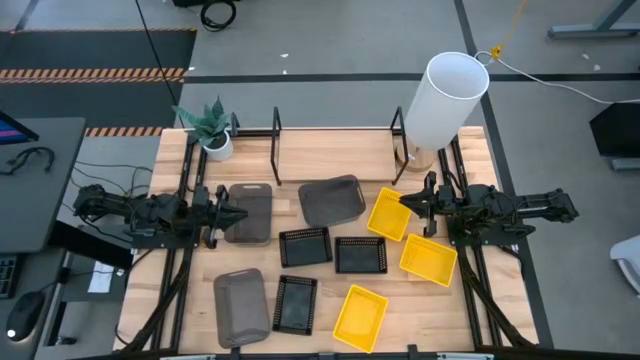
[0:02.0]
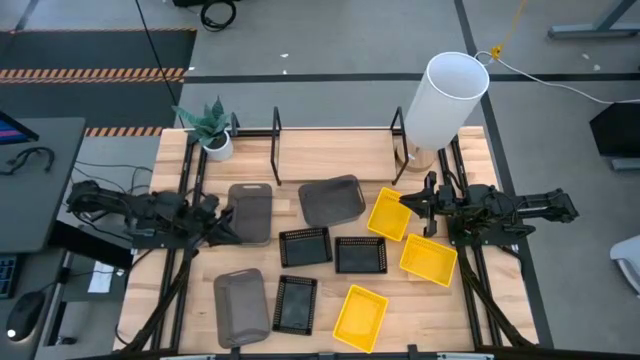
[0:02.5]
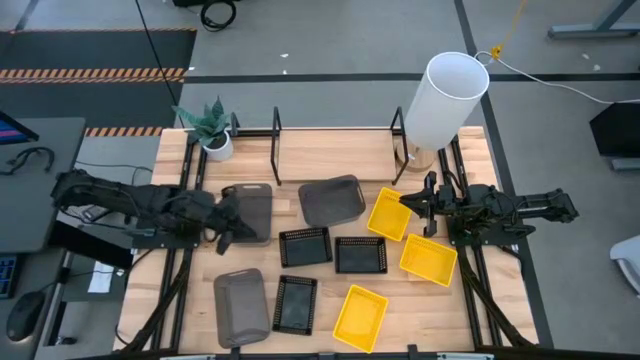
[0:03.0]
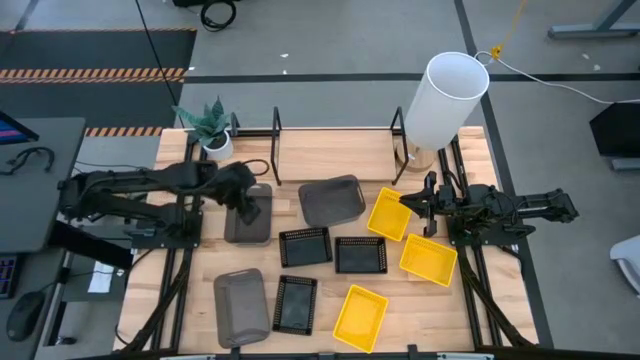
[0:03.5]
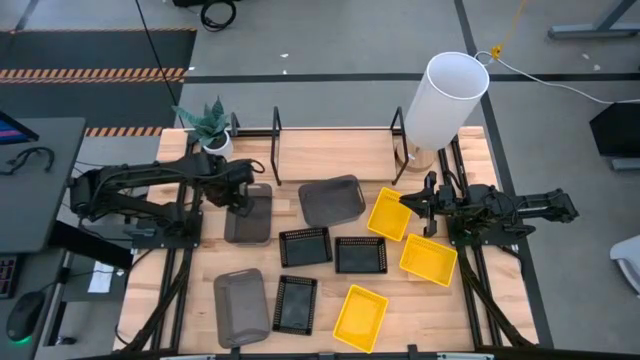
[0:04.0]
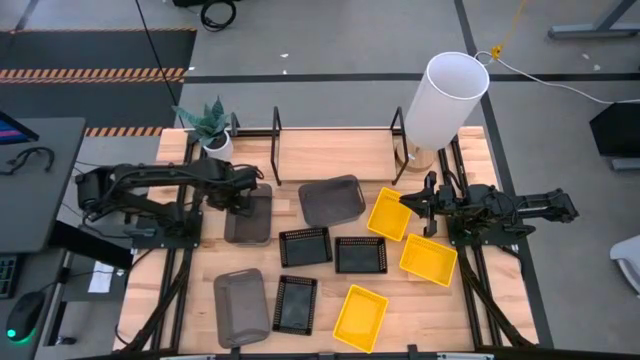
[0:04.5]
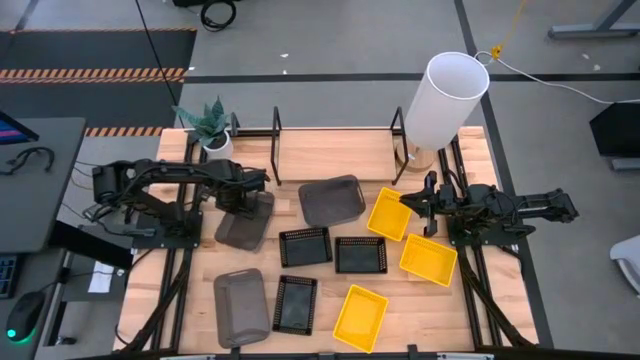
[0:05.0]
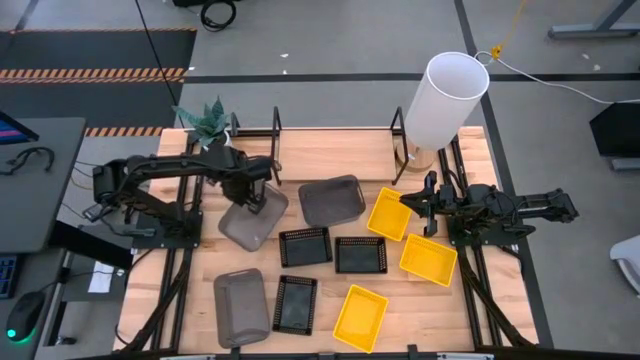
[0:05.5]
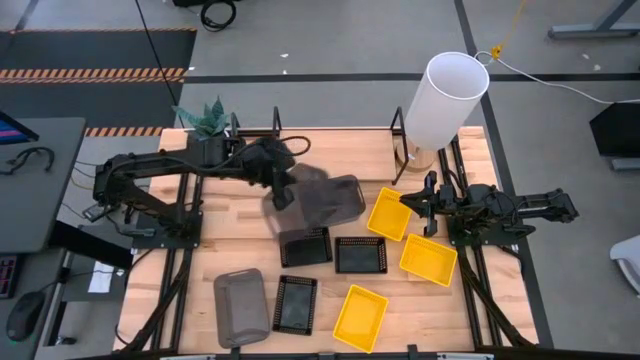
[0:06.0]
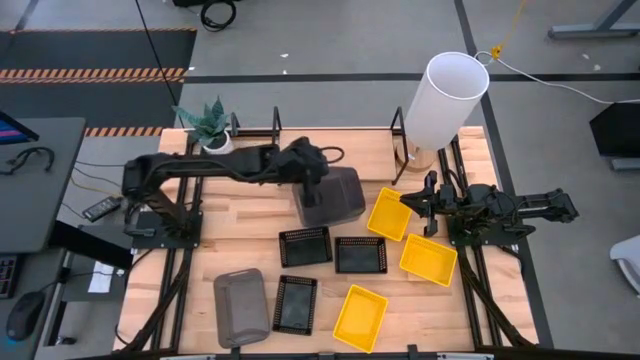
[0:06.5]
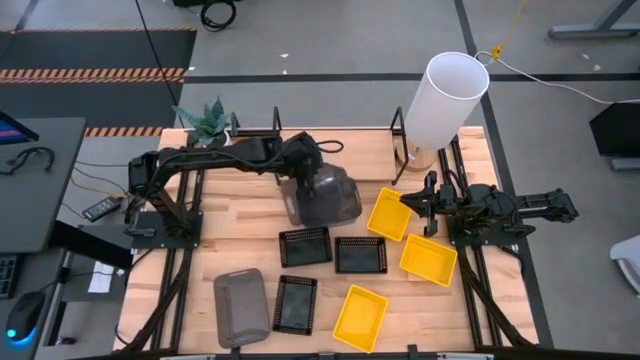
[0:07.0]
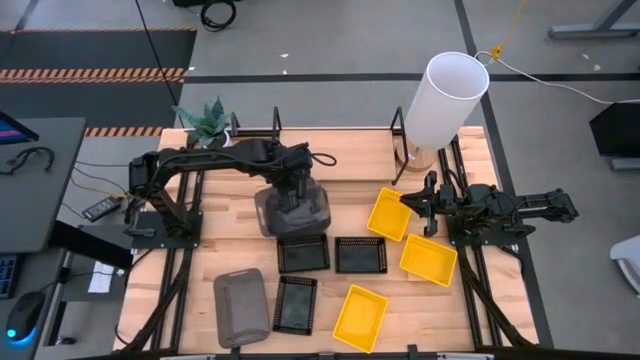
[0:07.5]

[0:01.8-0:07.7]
Task: Stack baskets on shelf by color
Stack the top left black bin on the top right black bin

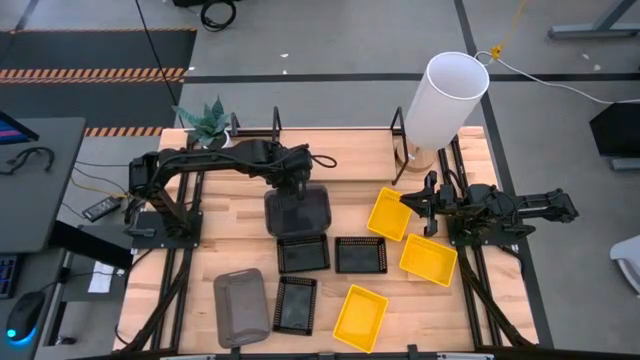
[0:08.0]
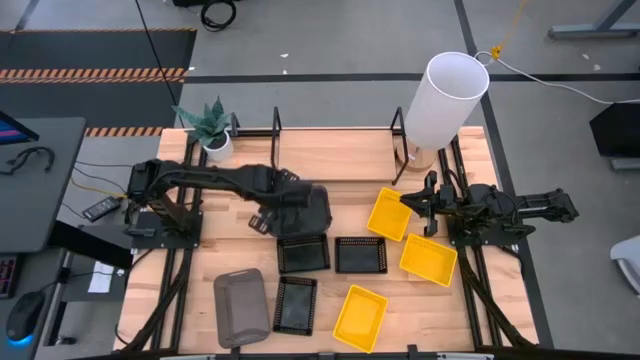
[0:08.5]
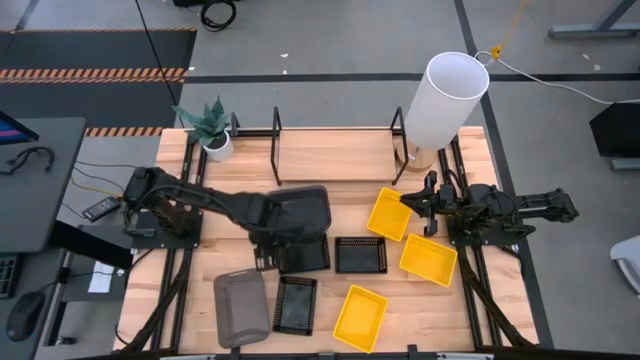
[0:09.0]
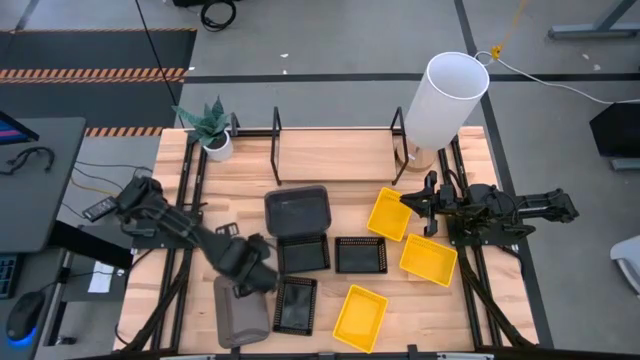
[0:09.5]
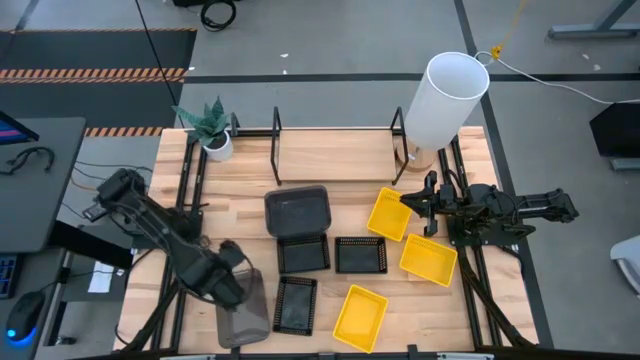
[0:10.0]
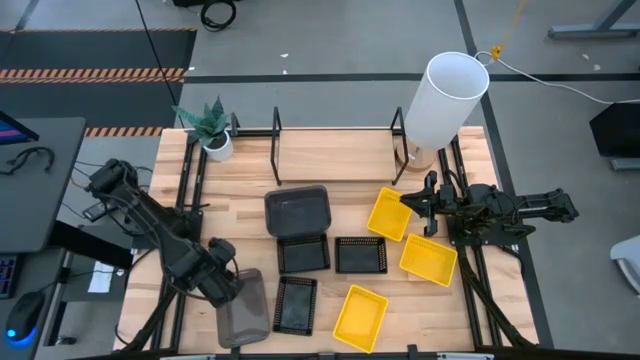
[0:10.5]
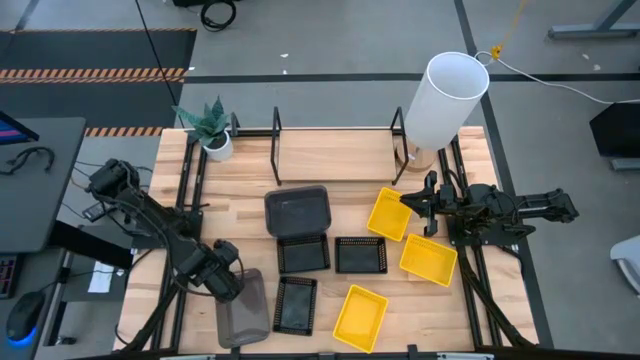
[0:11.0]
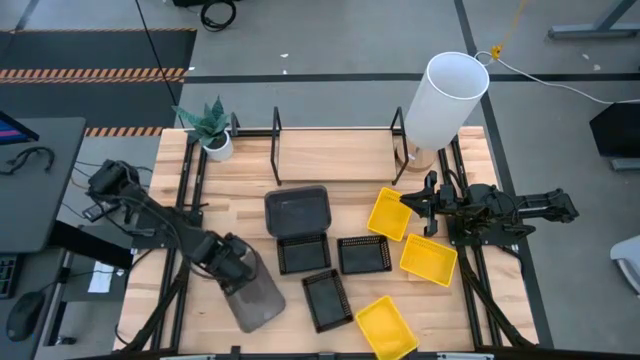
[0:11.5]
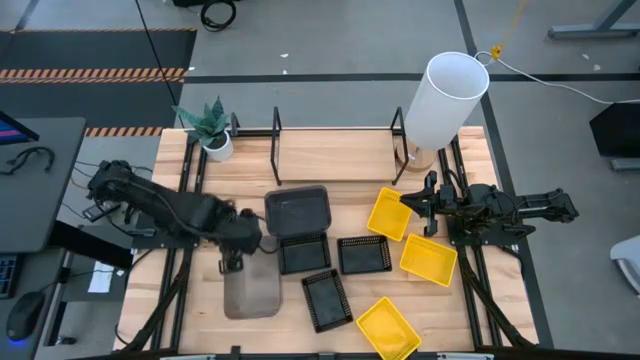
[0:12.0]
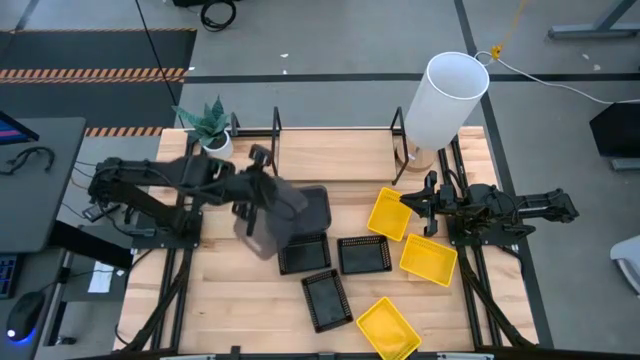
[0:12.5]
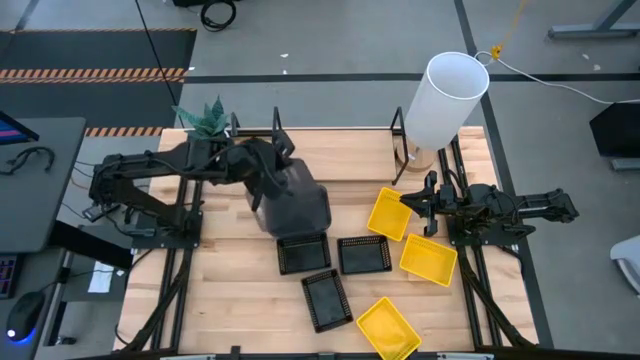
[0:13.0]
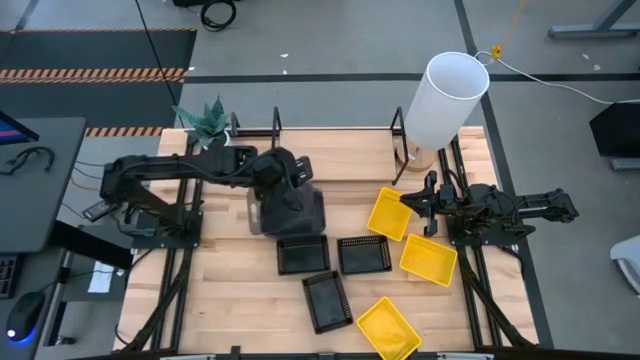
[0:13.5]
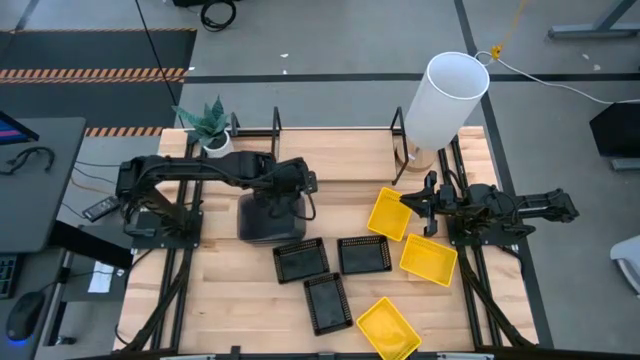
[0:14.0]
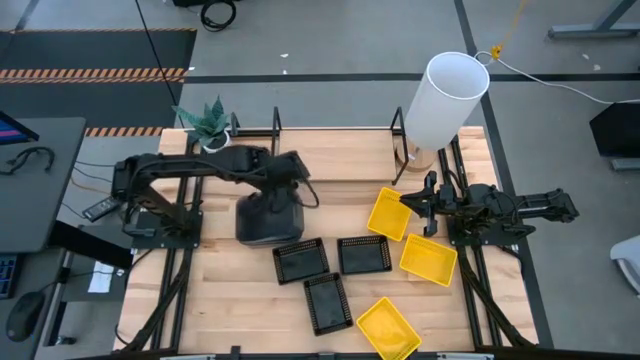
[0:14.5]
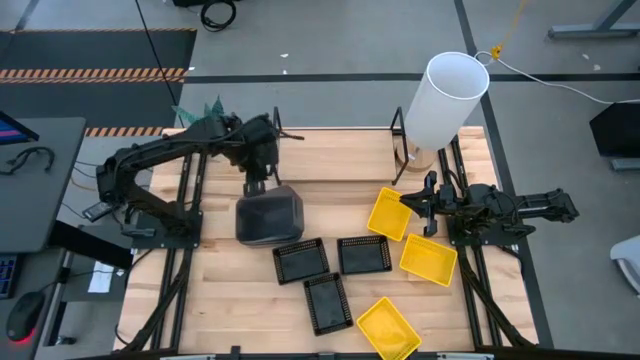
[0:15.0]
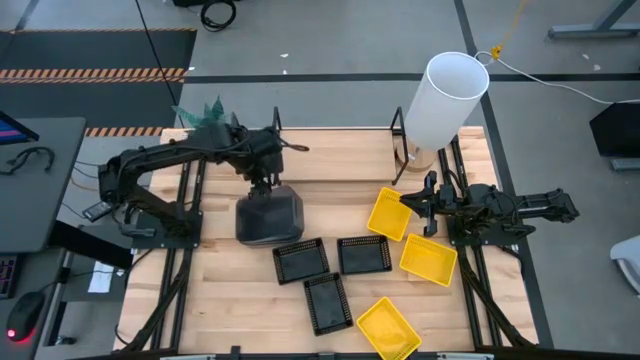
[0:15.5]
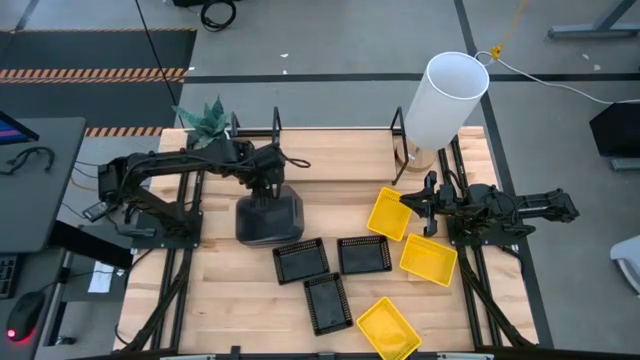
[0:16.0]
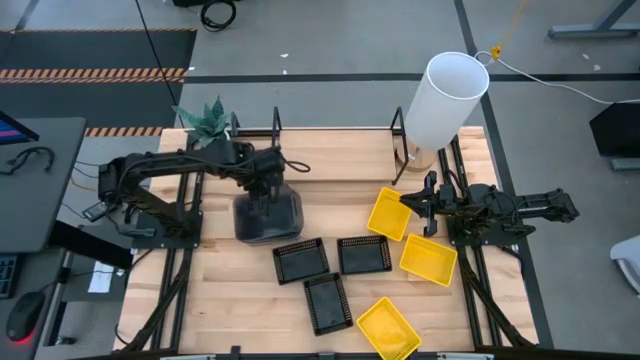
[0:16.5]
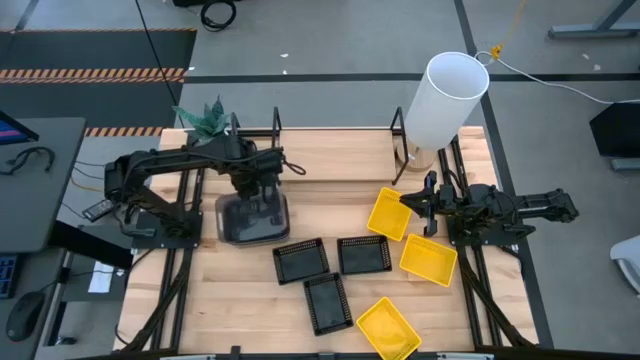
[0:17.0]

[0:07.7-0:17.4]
Stack the bottom black bin on the top black bins

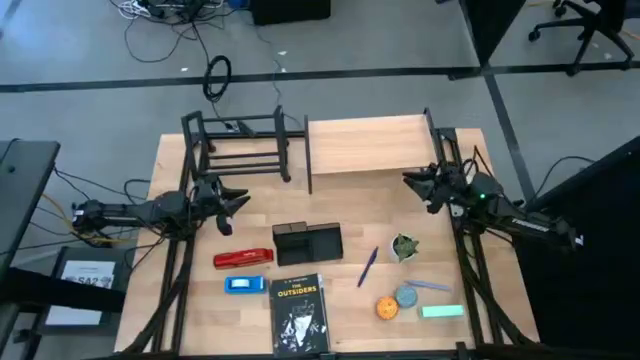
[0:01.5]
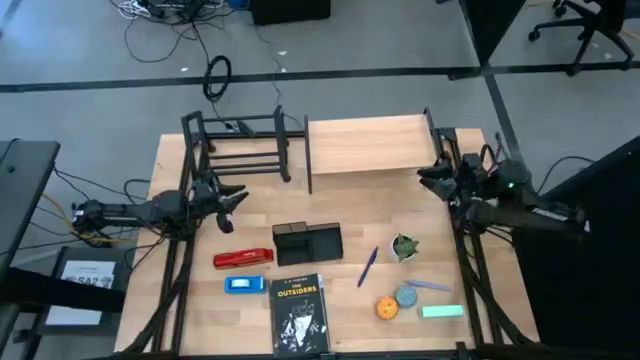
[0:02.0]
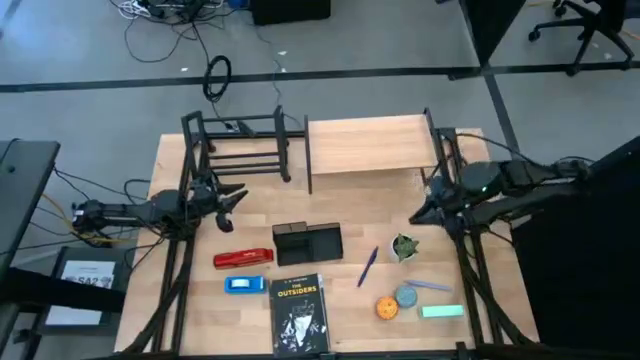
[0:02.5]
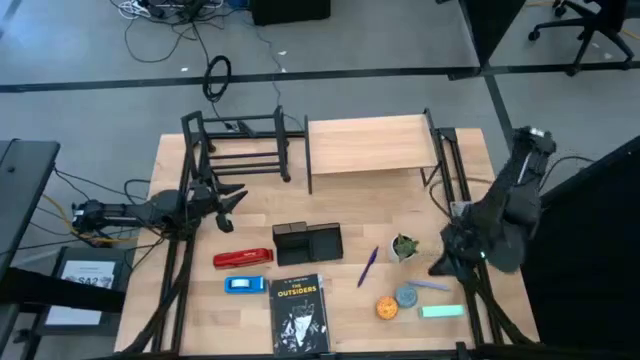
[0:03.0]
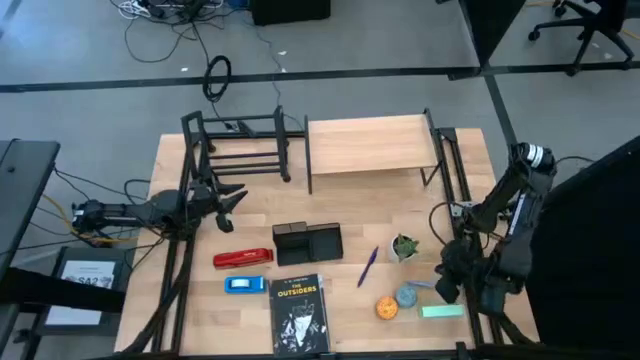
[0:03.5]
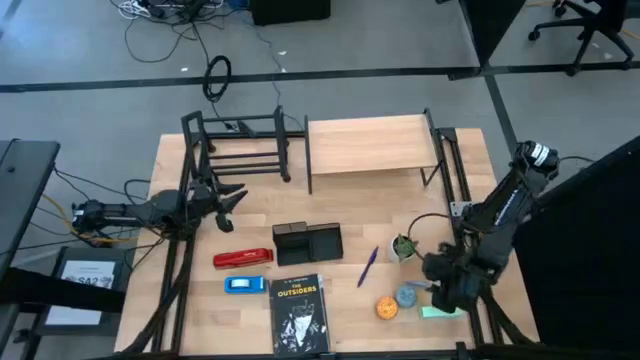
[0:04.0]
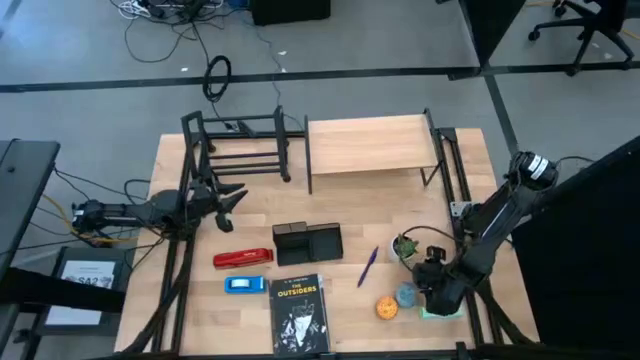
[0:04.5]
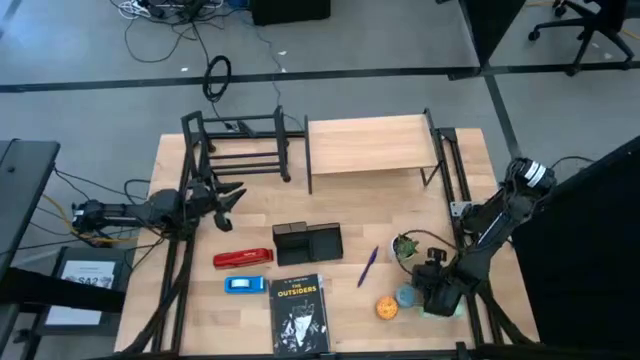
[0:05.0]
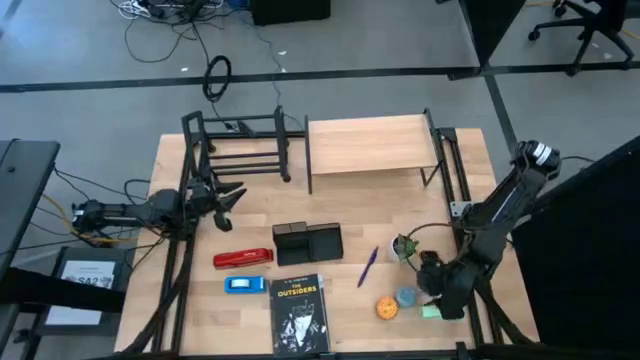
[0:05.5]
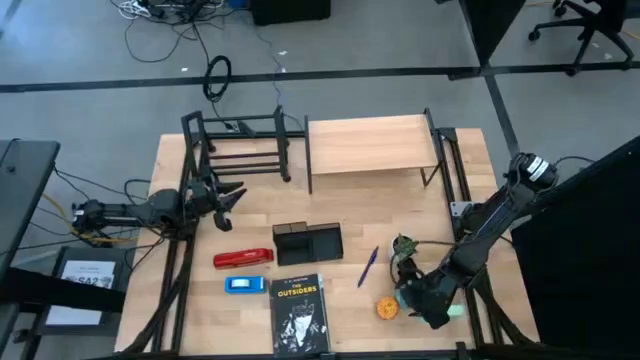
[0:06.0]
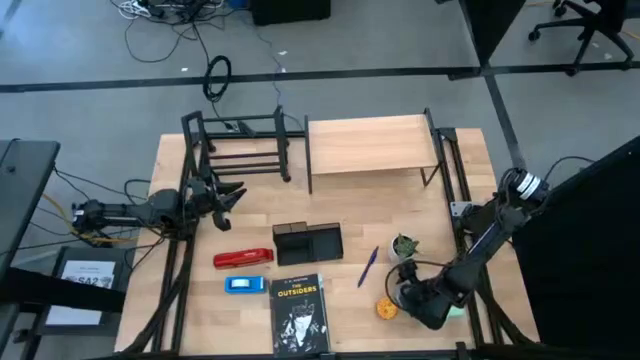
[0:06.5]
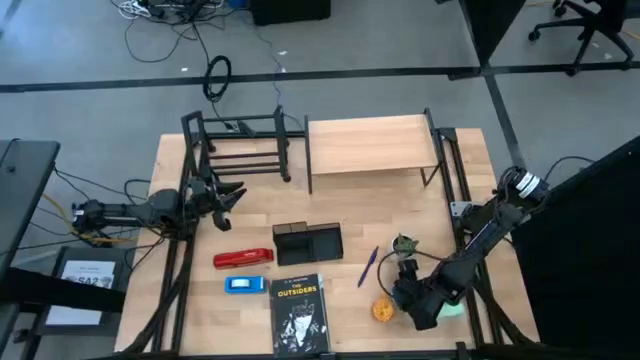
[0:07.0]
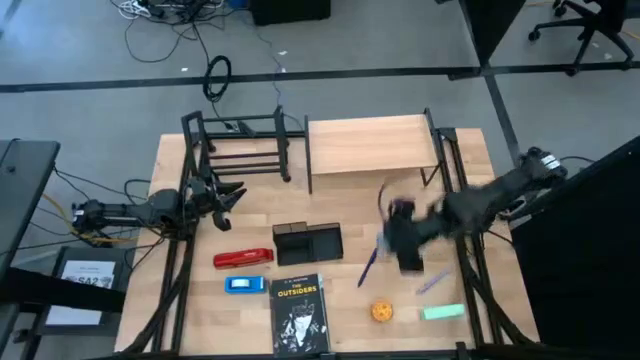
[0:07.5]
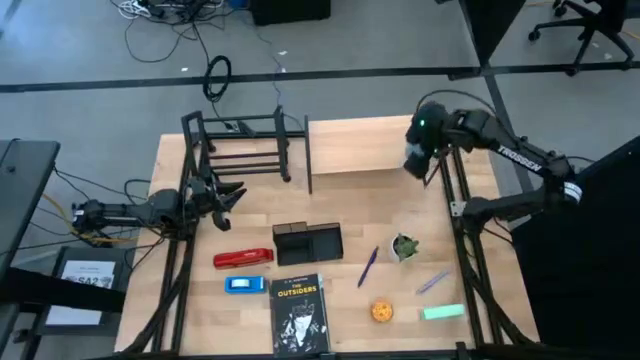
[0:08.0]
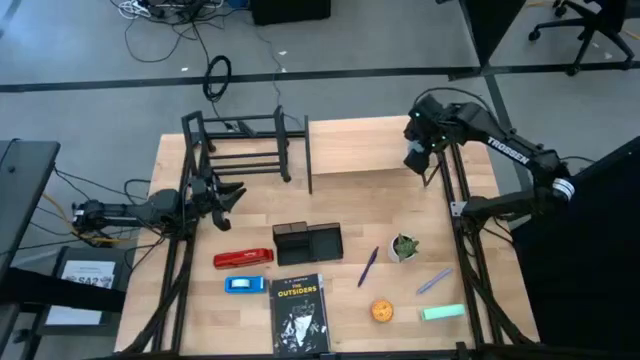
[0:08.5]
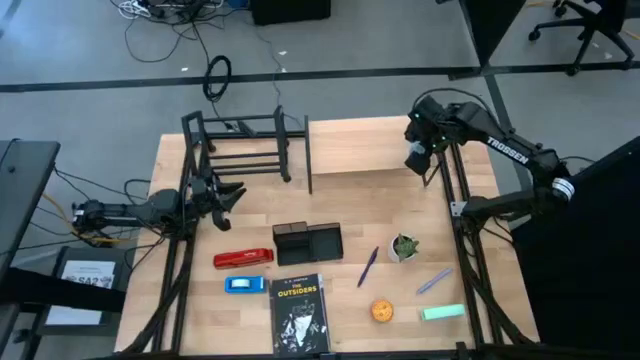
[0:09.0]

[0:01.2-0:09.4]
Task: Stock shelves
Put the blue scented candle on the shelf
